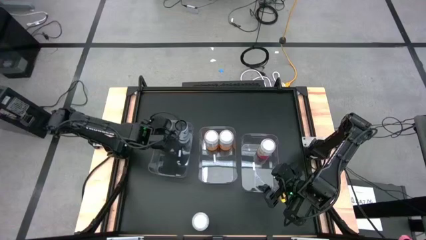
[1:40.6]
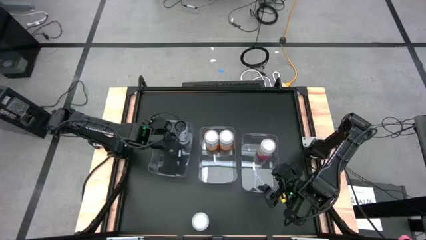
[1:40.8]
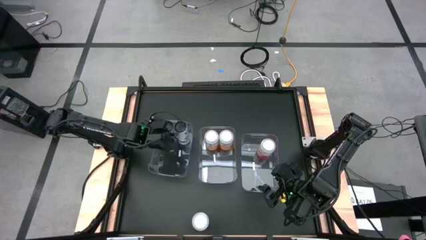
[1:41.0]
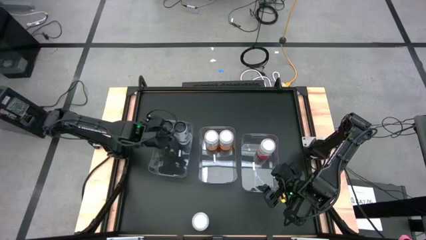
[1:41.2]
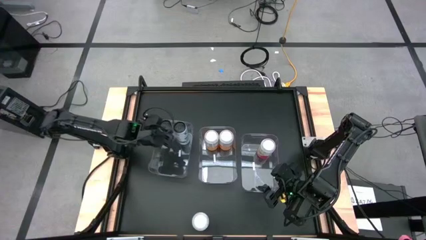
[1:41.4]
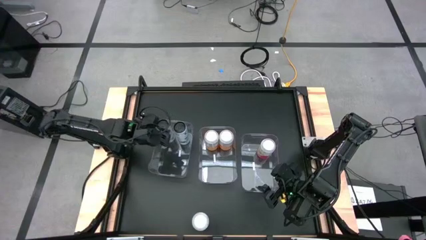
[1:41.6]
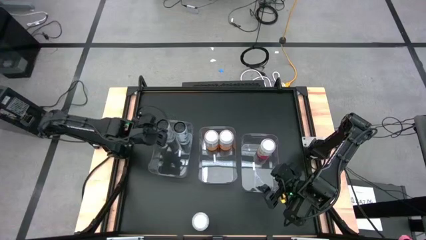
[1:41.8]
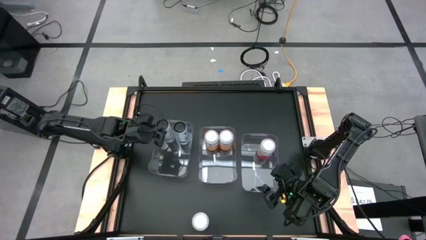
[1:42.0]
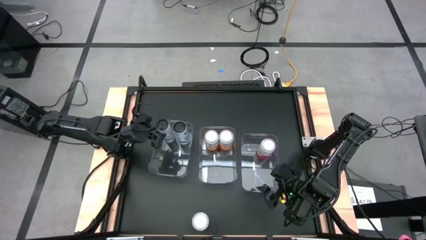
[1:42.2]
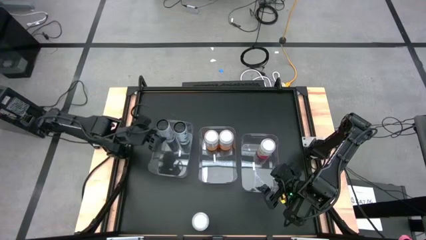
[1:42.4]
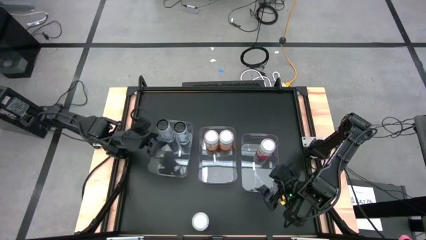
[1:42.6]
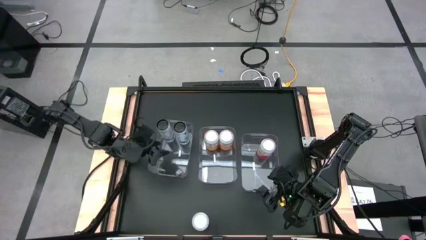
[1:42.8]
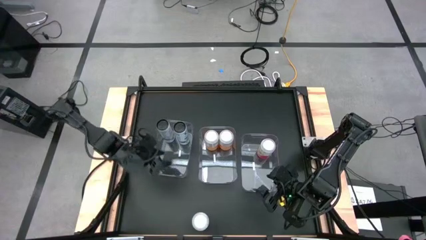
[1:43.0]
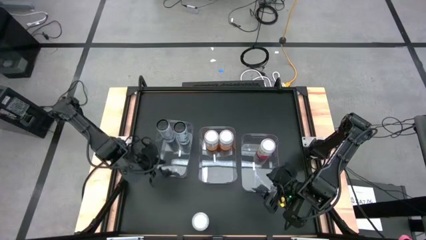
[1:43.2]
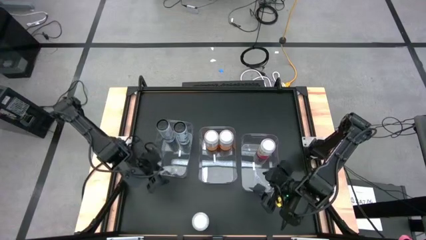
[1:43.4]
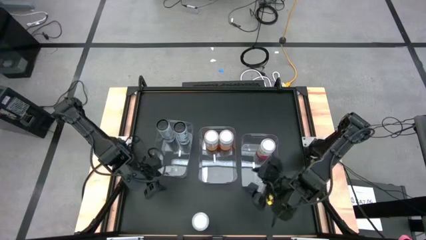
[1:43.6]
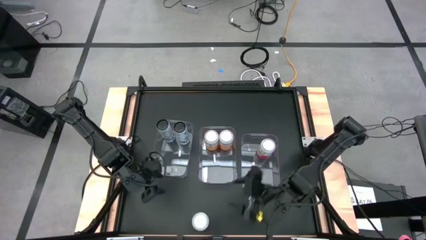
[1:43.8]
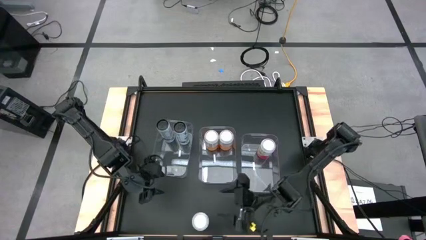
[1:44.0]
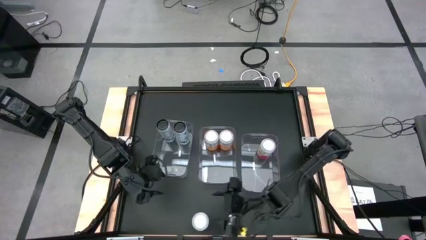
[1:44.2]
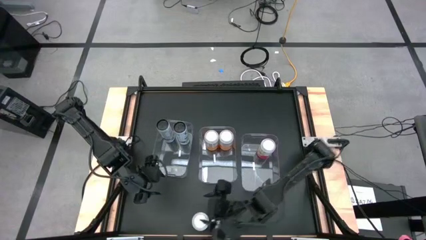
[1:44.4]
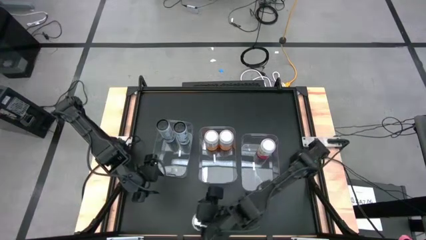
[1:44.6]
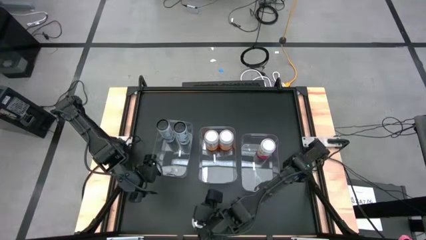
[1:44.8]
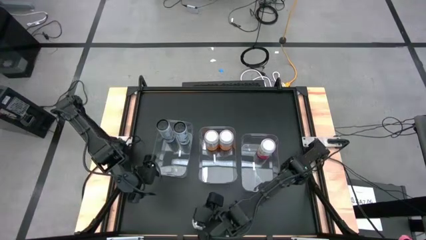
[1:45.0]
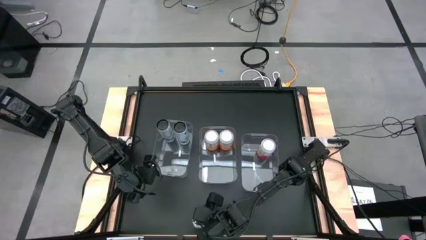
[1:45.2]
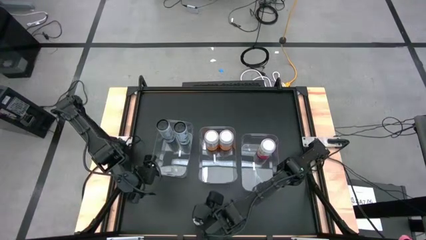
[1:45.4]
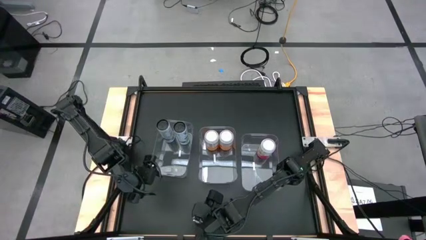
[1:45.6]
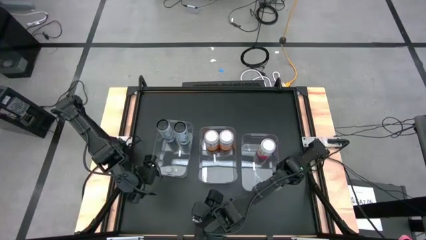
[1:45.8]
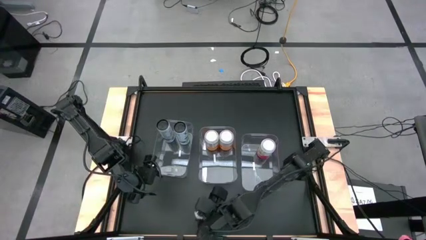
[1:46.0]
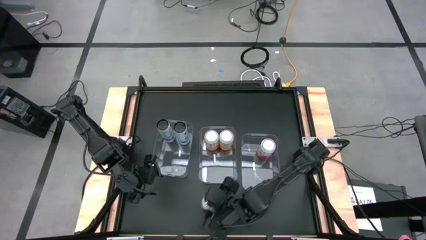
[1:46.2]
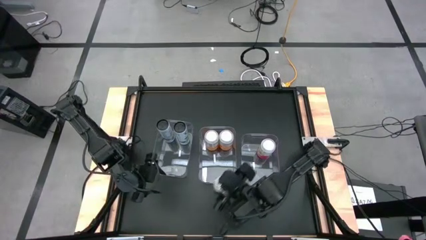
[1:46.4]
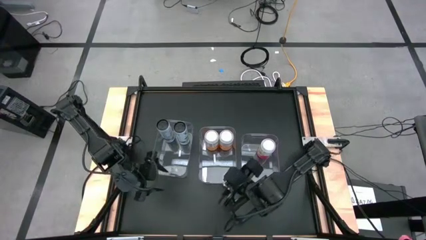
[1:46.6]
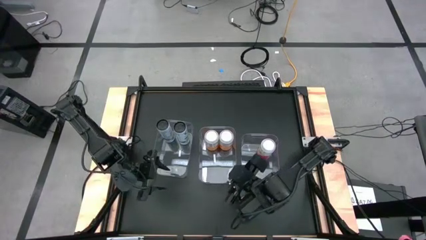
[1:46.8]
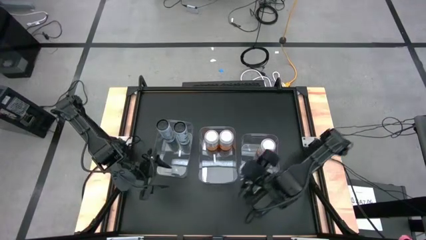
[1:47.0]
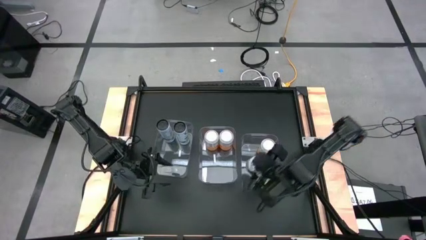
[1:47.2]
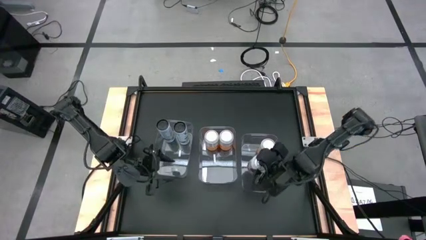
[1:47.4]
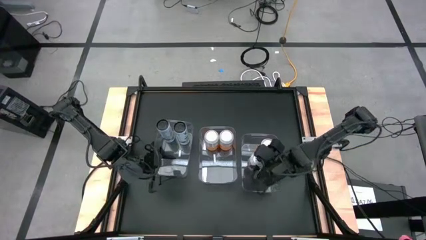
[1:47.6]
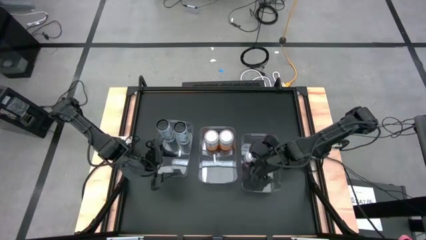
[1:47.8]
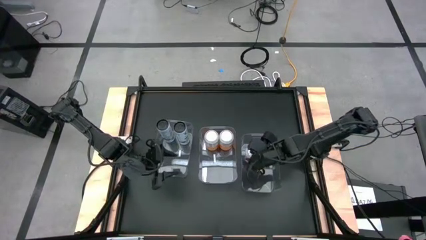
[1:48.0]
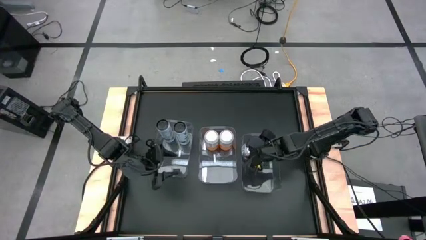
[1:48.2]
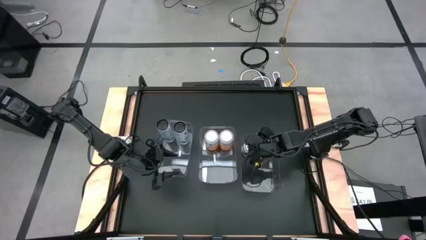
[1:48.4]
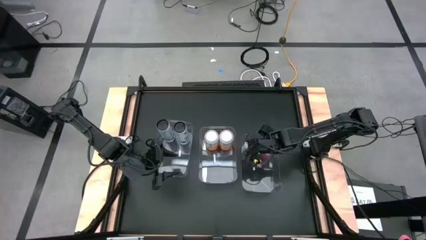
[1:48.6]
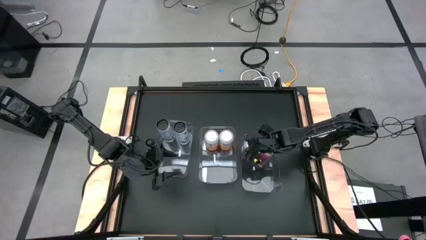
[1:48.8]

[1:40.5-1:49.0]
Task: Sort soda cans
Put the pink-white soda can into the right transparent bin

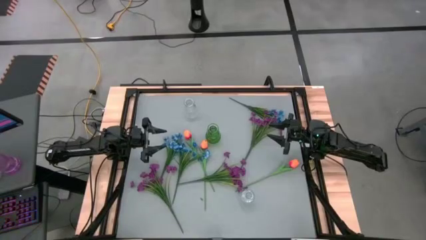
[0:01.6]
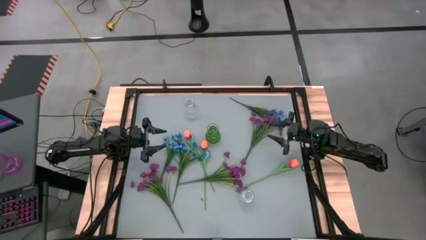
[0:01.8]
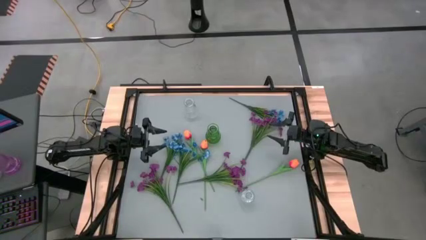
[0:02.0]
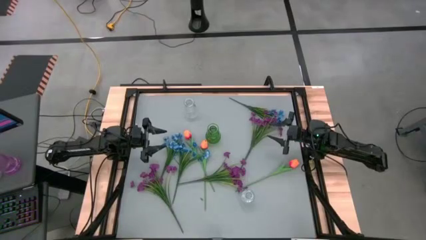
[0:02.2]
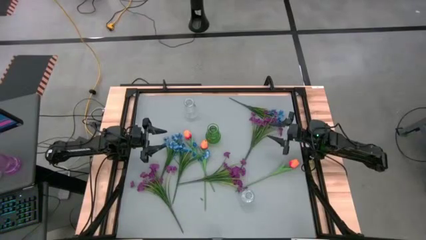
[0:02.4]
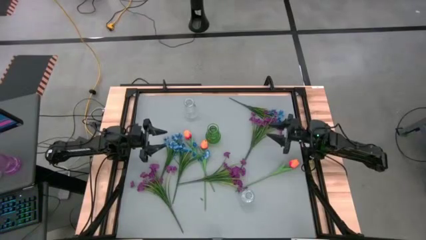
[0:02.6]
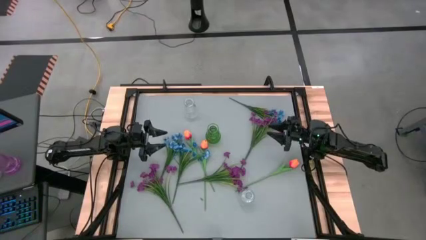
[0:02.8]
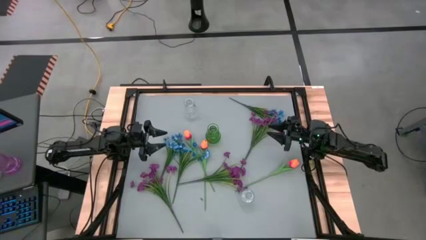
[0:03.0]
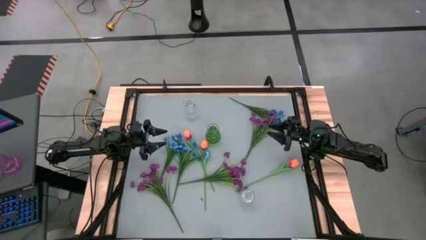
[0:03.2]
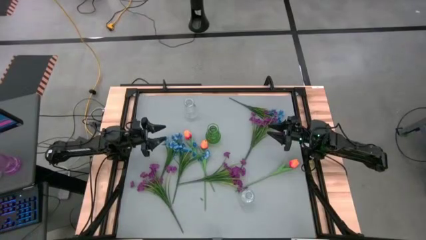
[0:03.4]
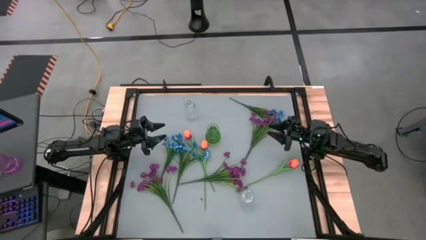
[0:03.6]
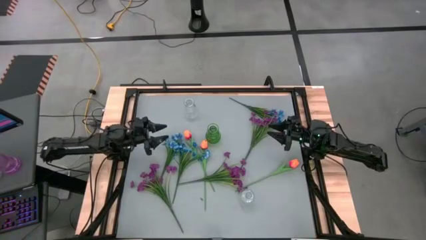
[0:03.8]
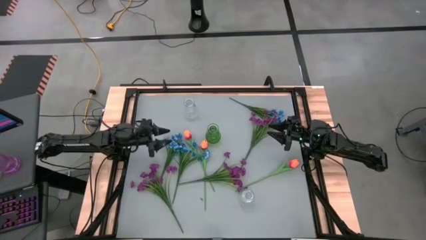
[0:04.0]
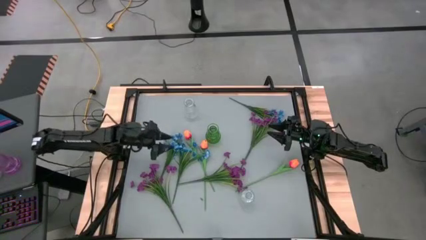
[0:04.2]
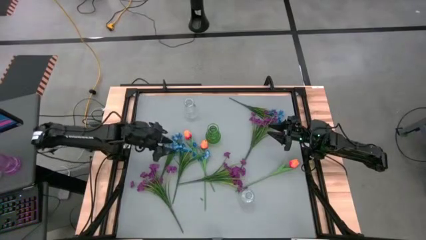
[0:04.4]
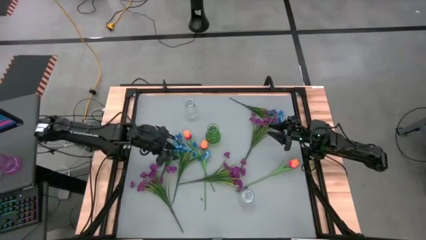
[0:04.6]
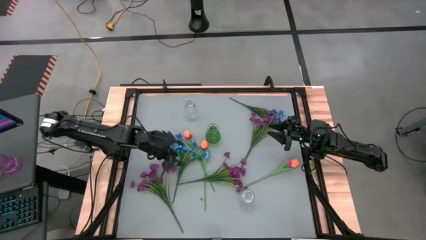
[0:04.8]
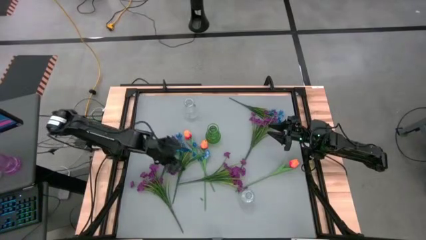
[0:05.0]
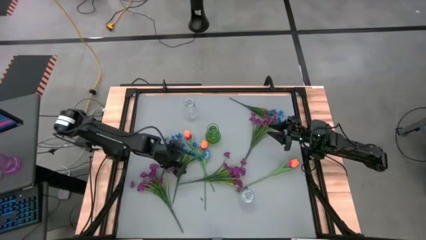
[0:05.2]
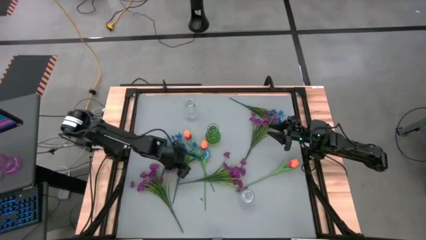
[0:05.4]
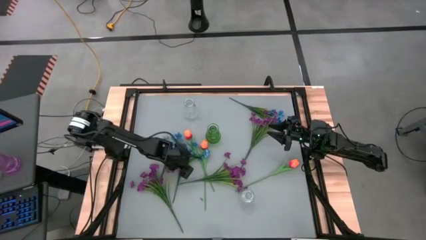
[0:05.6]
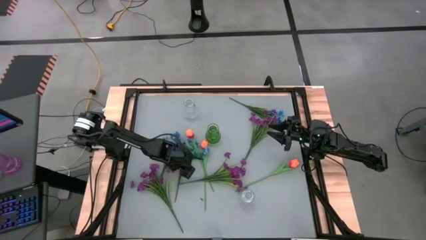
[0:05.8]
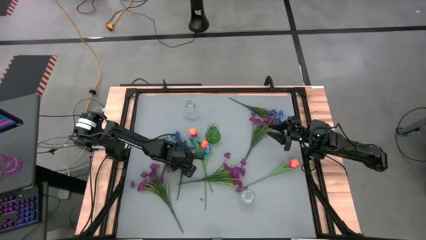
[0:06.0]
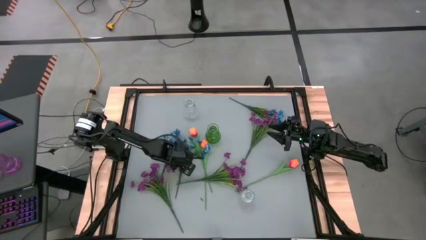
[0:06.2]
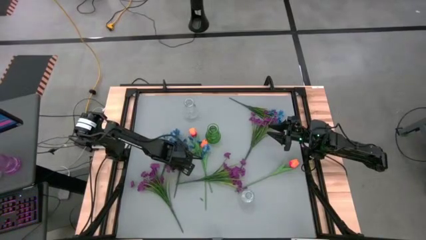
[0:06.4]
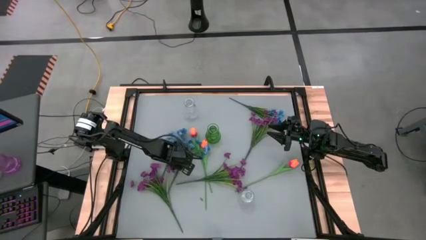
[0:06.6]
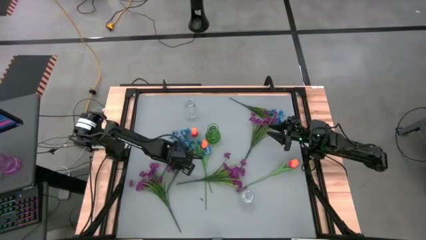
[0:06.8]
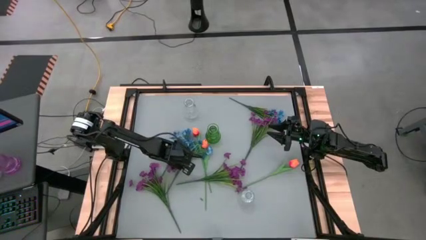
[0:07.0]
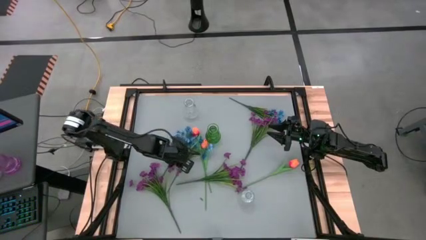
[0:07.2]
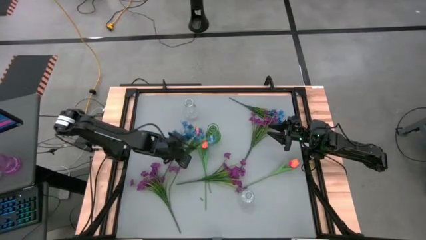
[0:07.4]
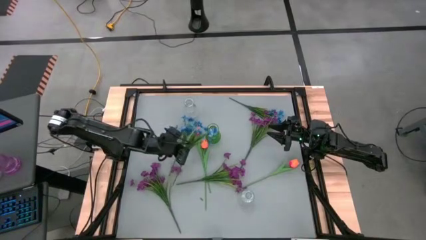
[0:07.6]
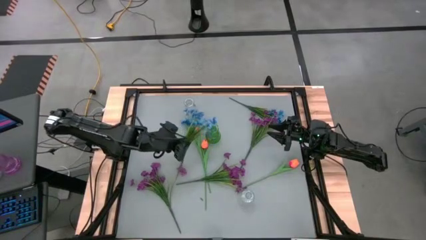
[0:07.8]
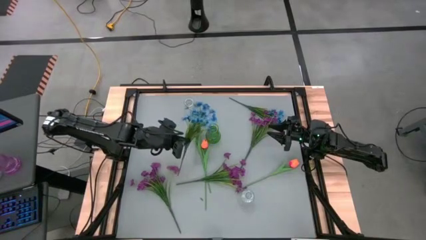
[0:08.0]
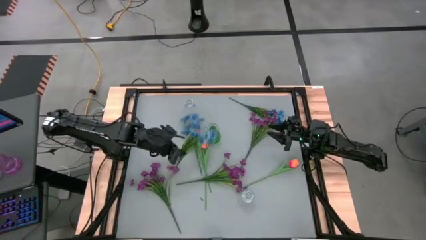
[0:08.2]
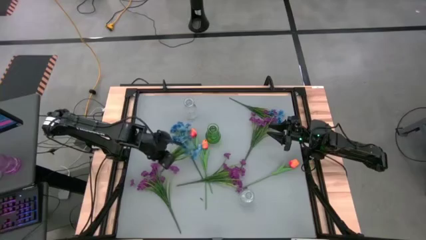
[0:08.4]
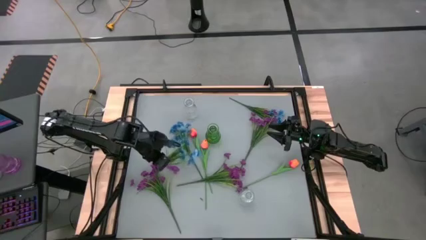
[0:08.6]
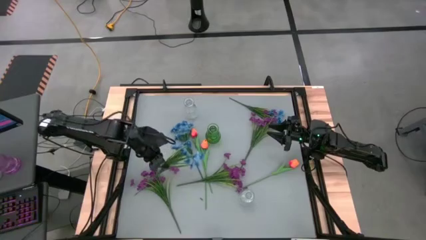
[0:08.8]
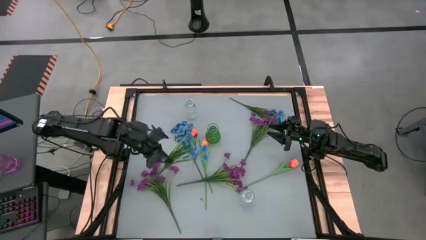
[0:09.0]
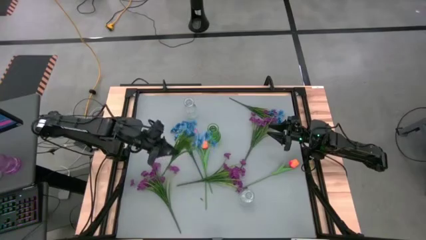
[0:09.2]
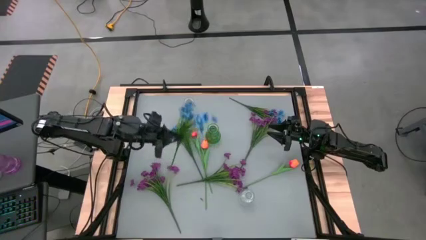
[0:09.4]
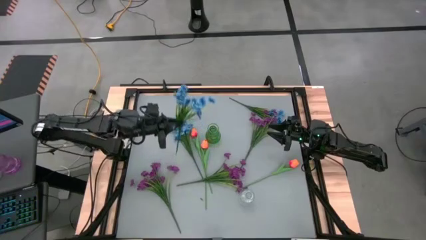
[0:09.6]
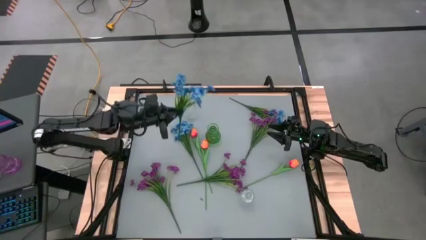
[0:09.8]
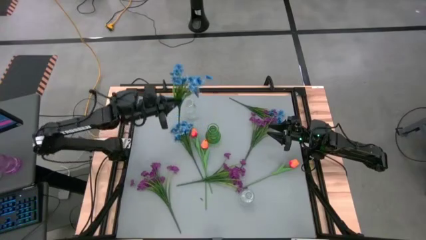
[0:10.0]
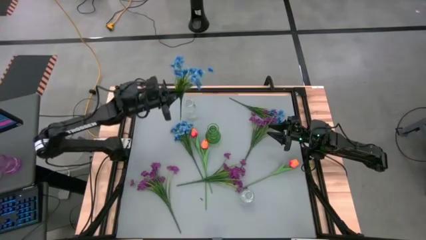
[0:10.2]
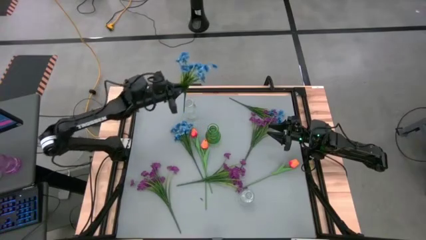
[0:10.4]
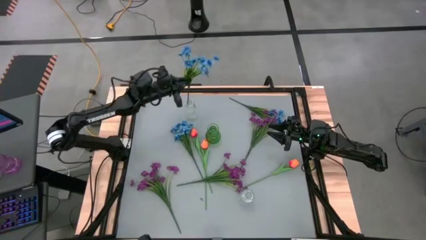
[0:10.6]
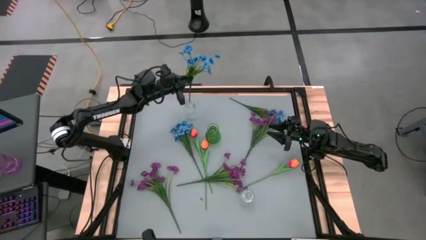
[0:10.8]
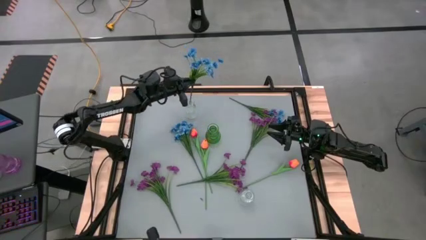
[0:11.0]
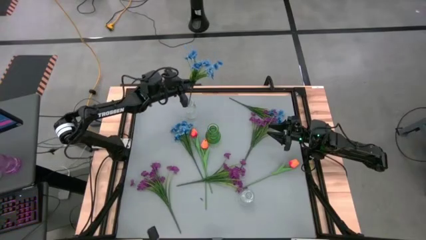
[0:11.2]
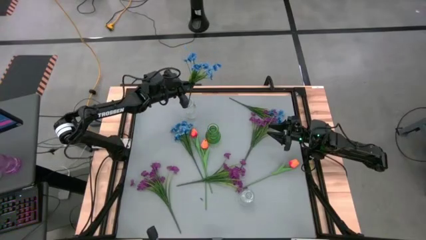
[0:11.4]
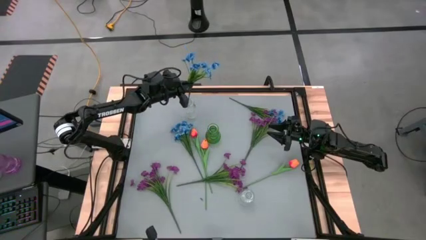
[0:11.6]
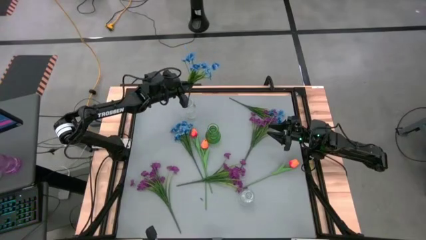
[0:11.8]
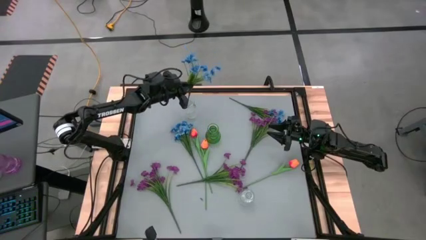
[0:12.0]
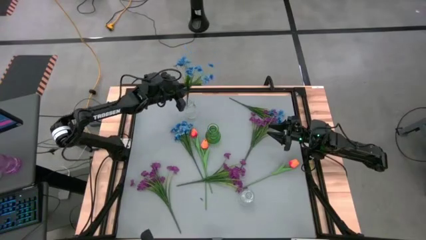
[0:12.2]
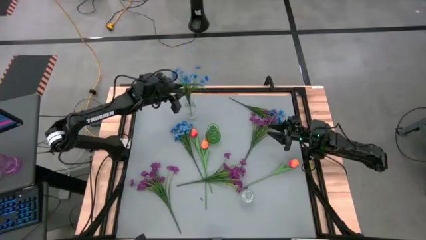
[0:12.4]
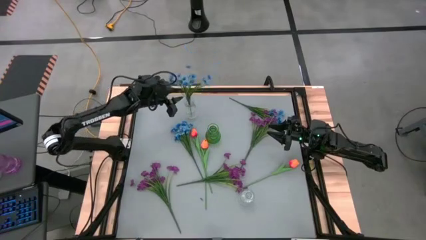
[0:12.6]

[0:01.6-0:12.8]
Task: Sort flowers into vase by color
Put the middle blue flowers into the top transparent vase
